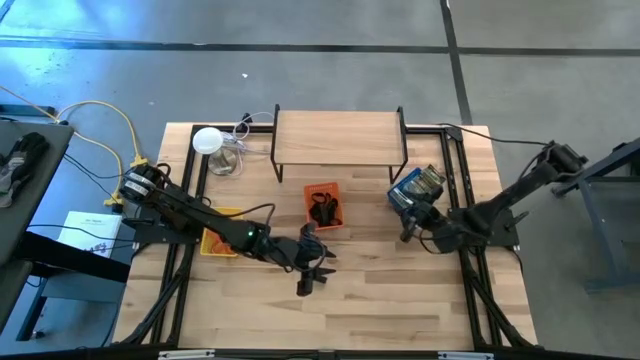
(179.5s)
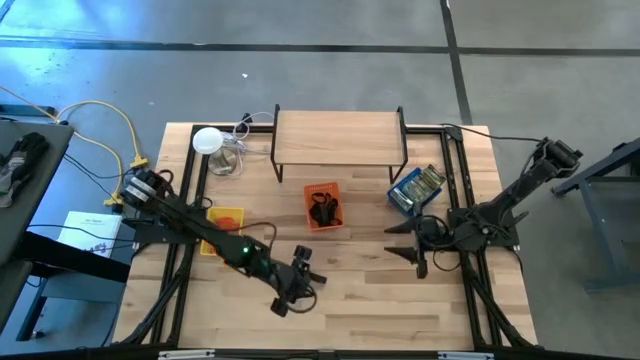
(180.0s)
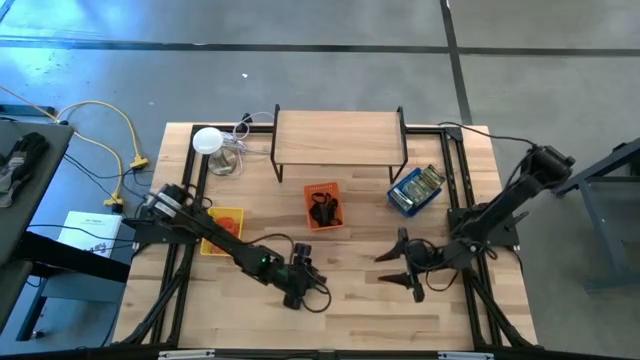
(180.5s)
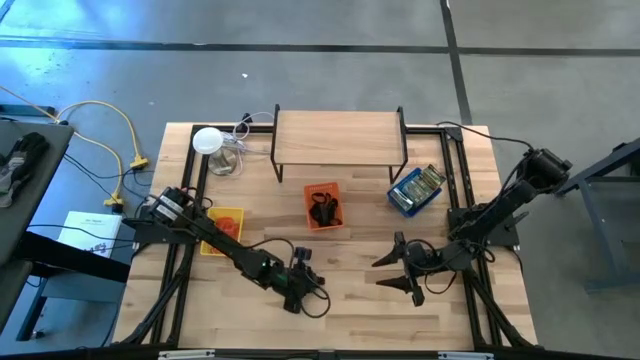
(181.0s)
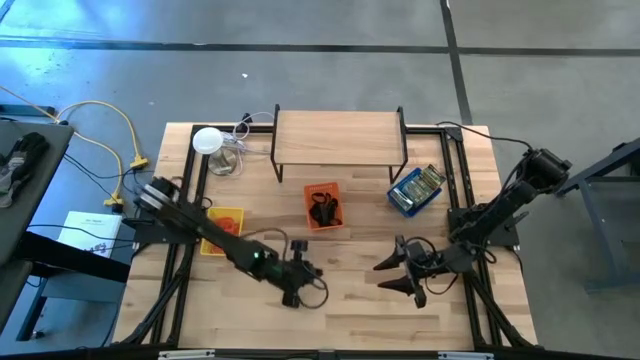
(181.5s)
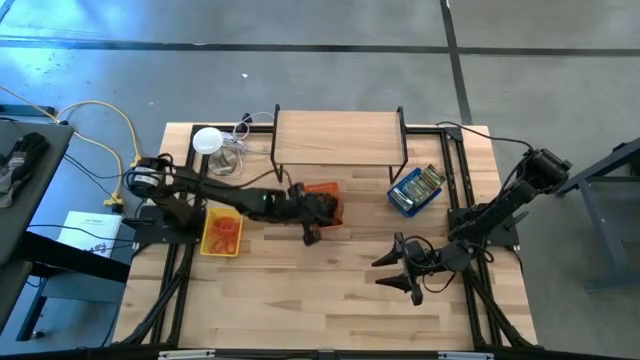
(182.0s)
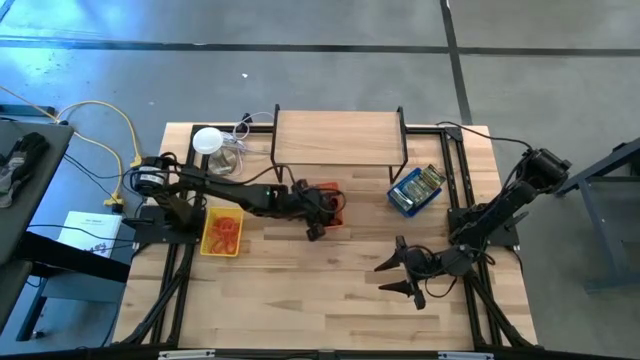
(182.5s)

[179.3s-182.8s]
Task: Pick & Place Office Desk Supplies
Put the black rubber band into the orange bin

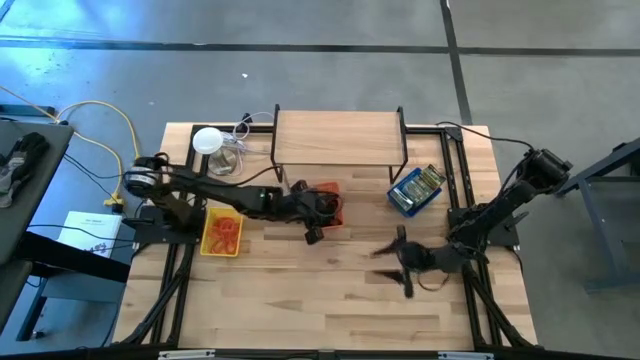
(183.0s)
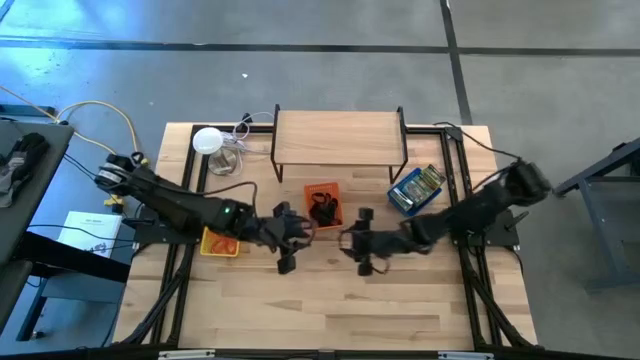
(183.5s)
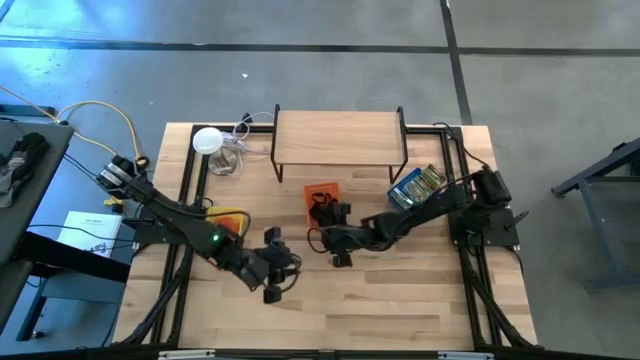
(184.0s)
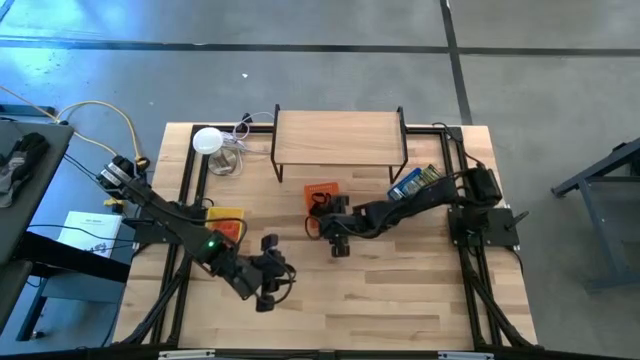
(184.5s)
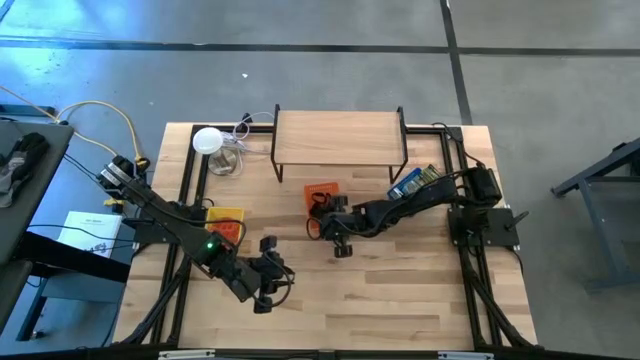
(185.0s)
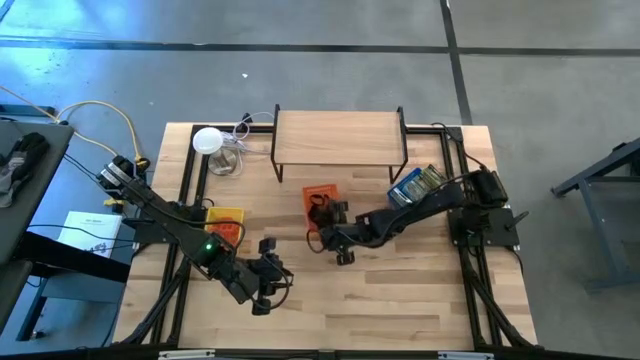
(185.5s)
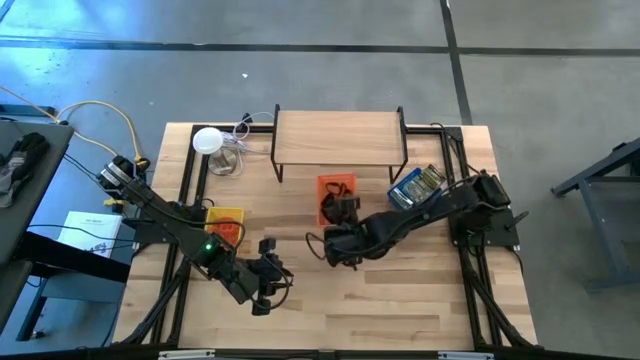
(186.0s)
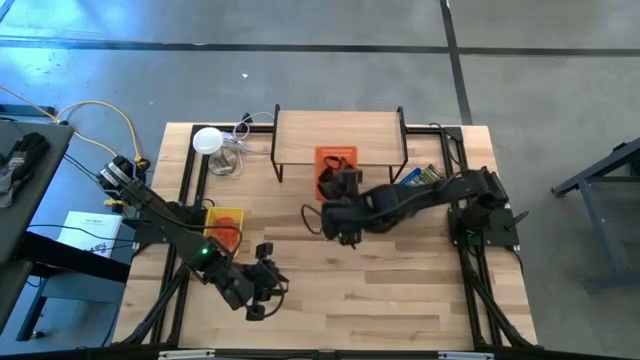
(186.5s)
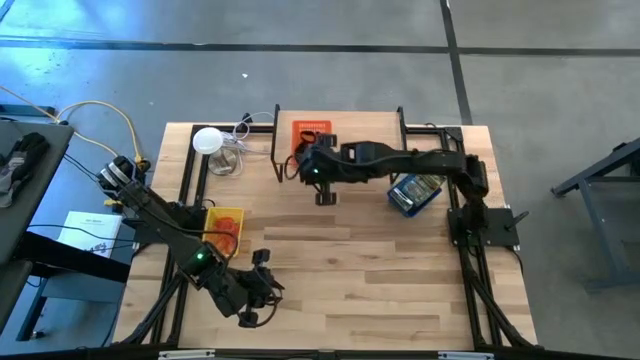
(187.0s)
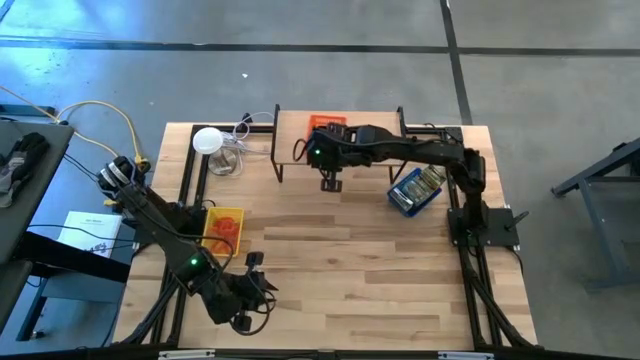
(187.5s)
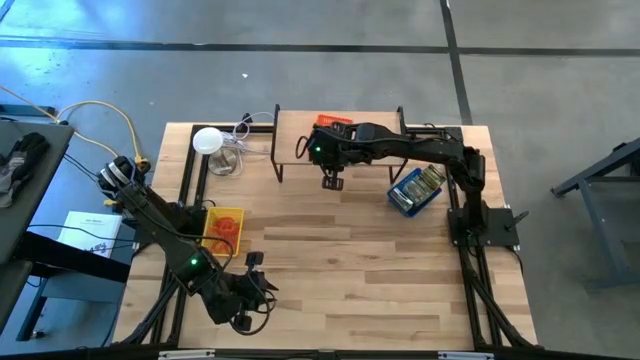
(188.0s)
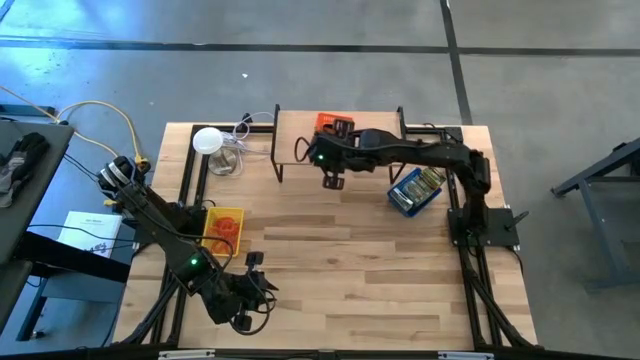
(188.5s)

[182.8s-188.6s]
Put the orange bin on the shelf

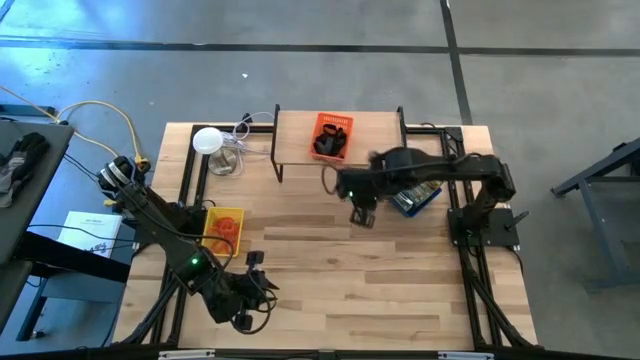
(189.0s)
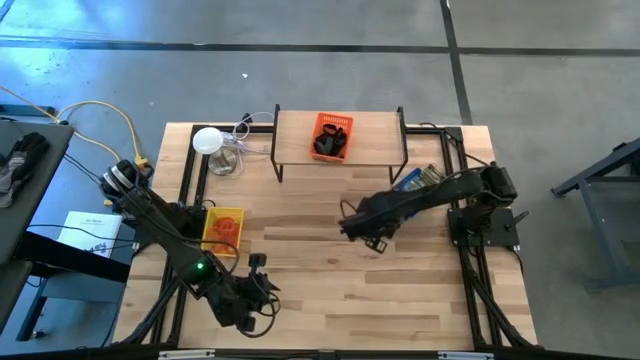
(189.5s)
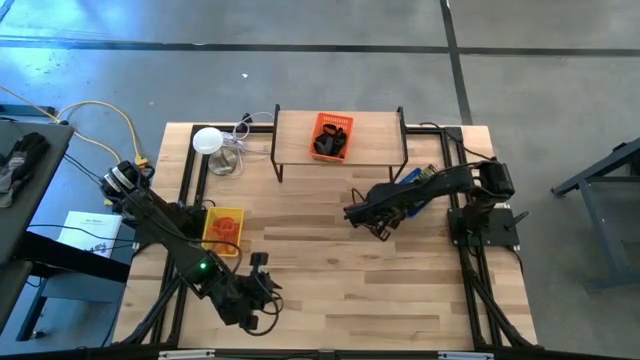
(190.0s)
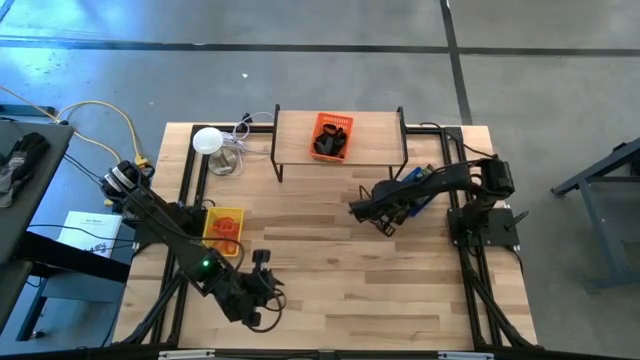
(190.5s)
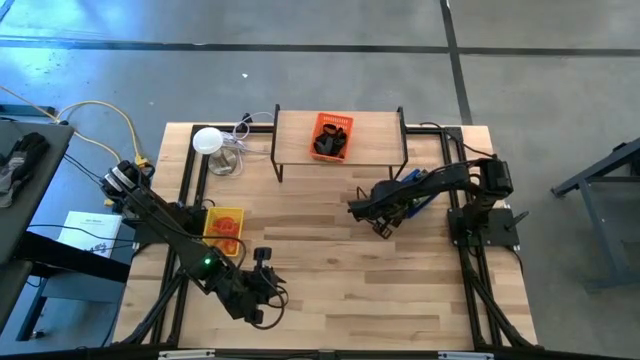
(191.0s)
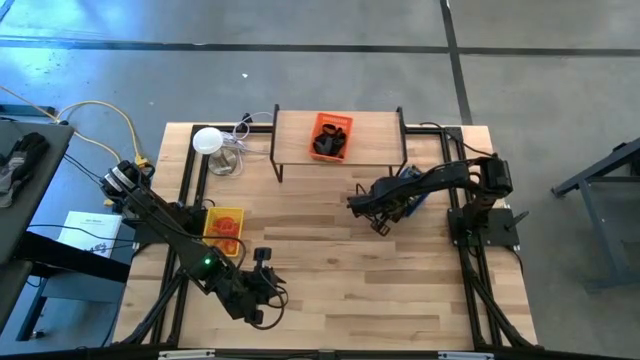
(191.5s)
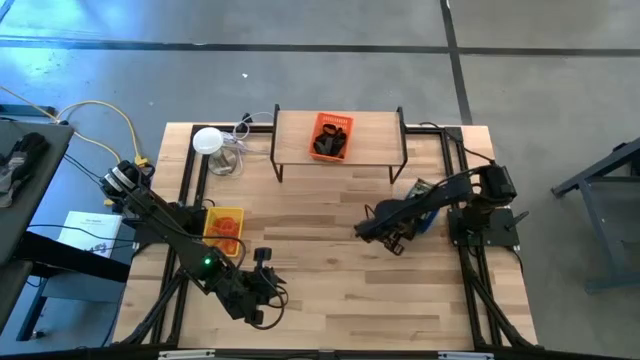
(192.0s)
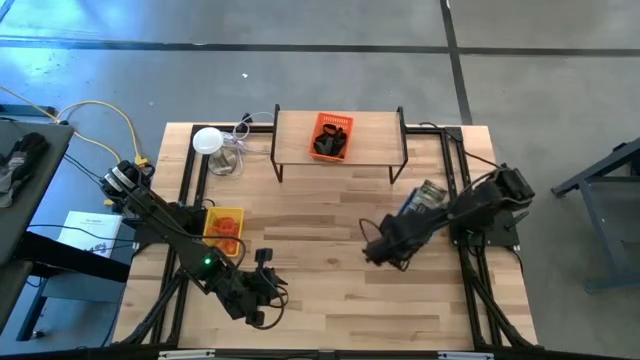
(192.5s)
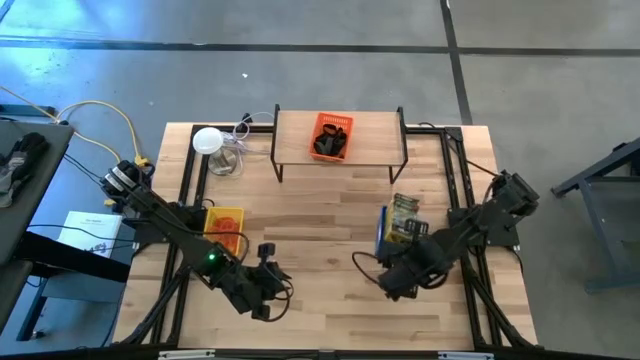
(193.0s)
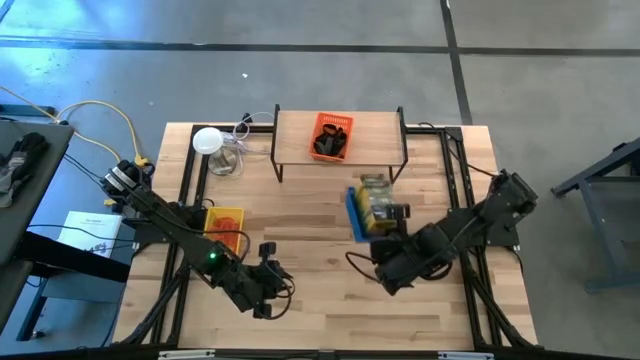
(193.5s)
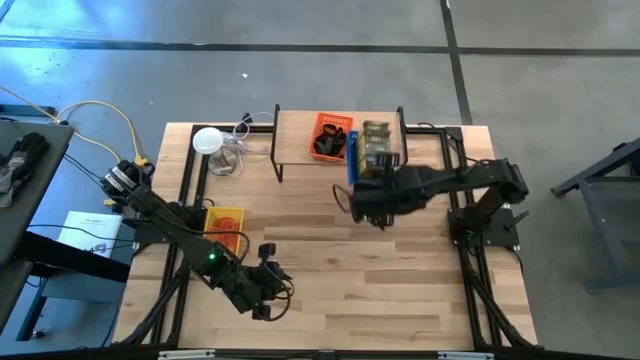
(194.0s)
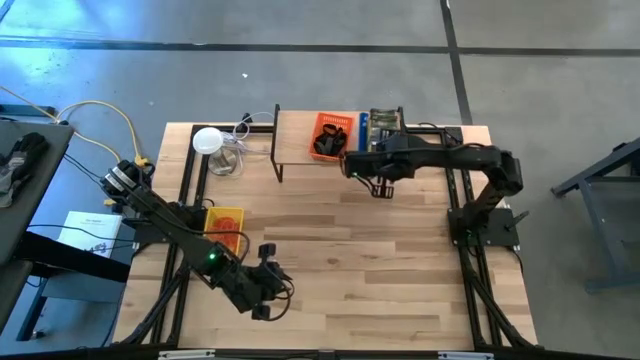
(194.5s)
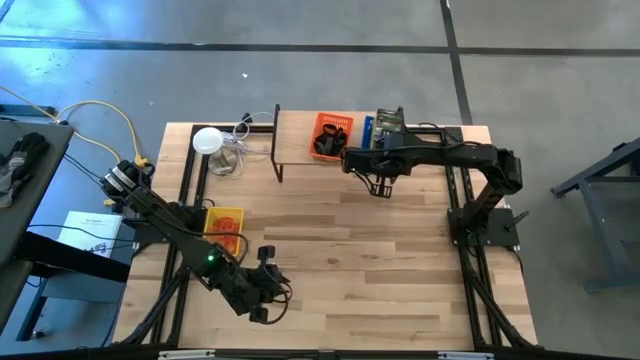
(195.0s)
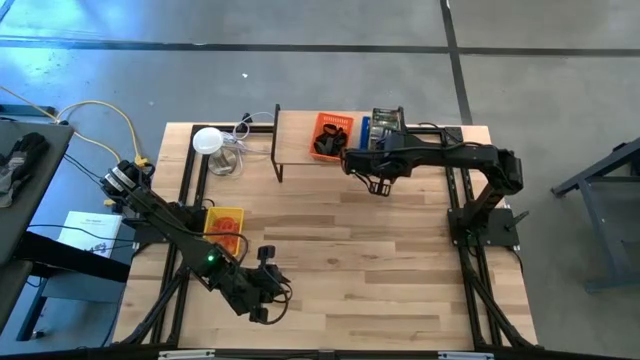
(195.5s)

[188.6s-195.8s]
Put the blue bin on the shelf

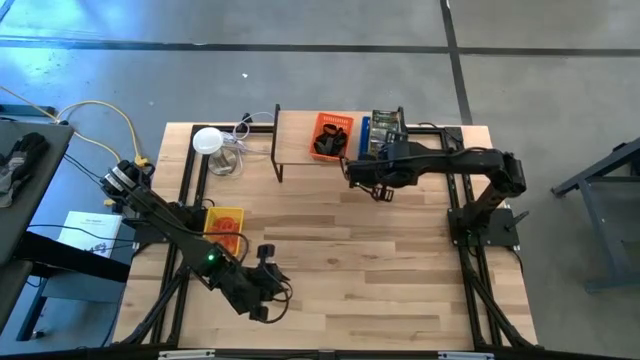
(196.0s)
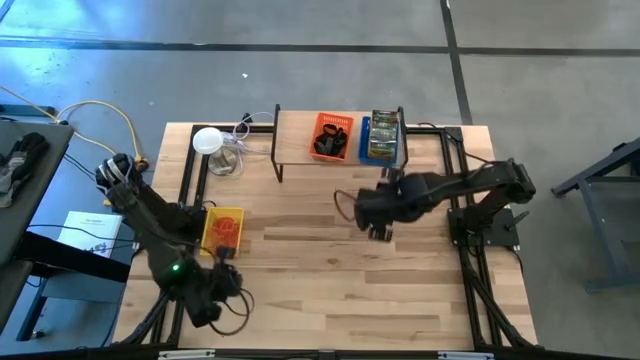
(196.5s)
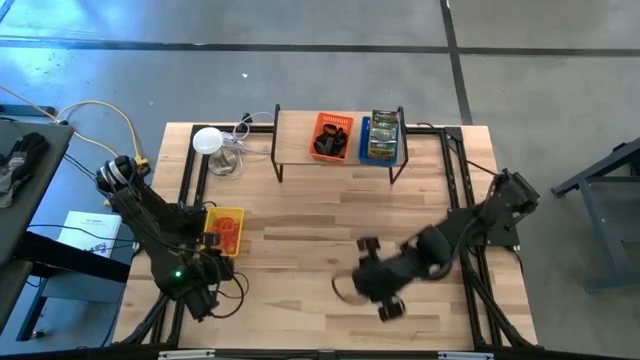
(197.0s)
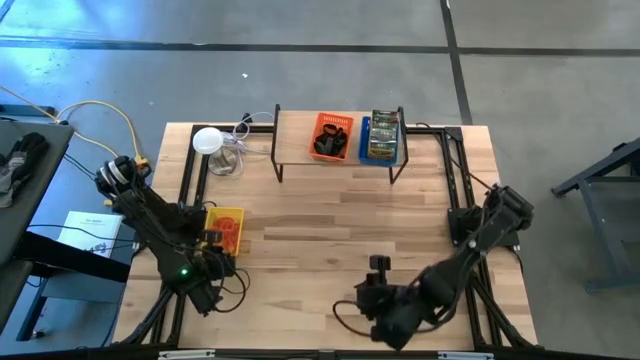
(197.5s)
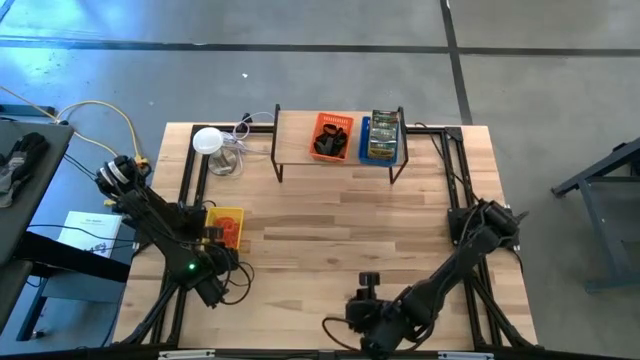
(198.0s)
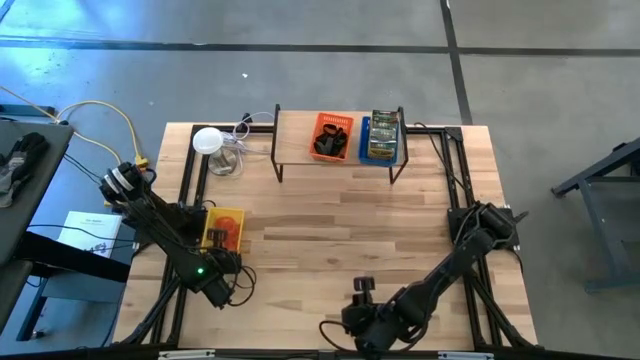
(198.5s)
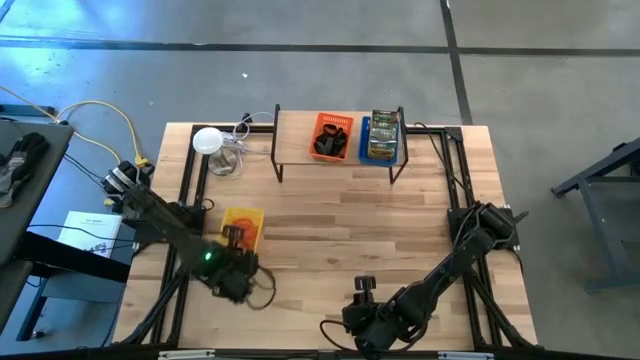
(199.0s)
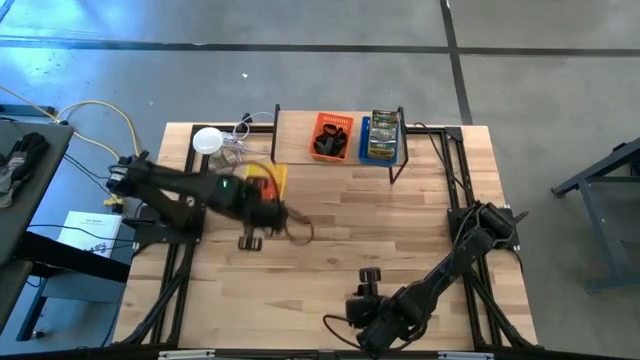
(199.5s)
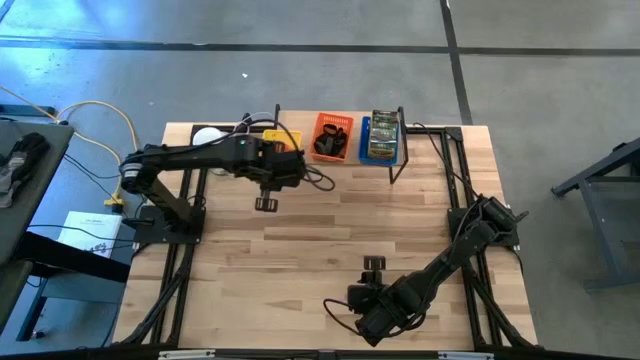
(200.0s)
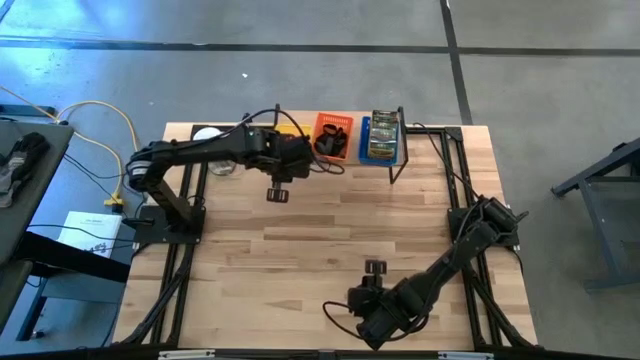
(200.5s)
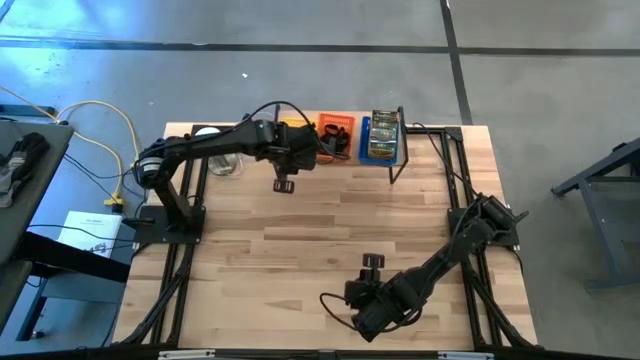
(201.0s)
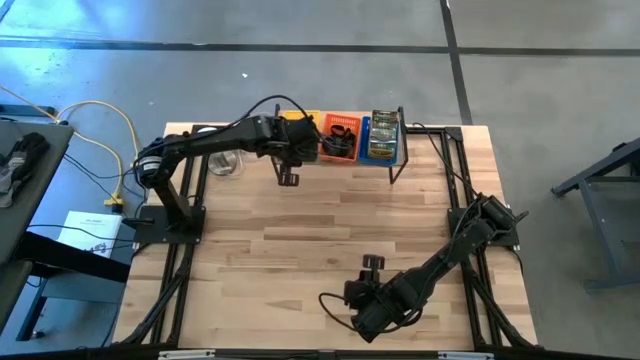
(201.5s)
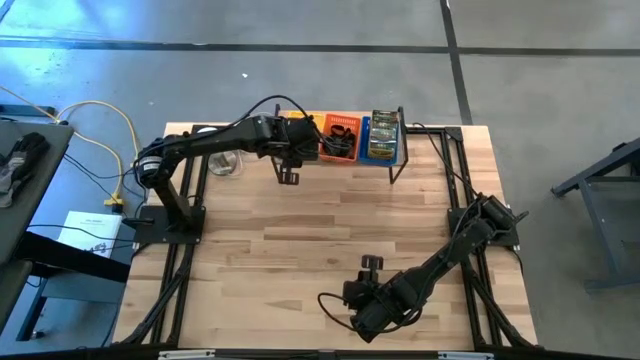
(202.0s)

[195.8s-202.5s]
Put the yellow bin on the shelf
